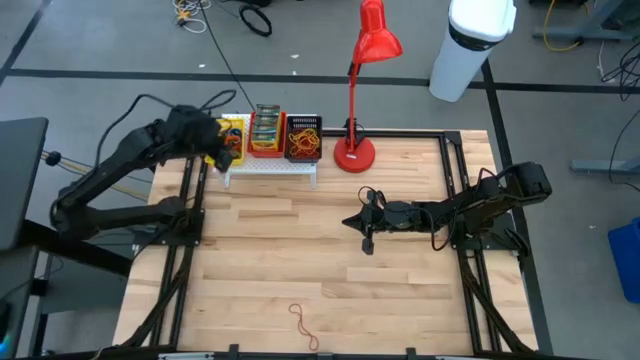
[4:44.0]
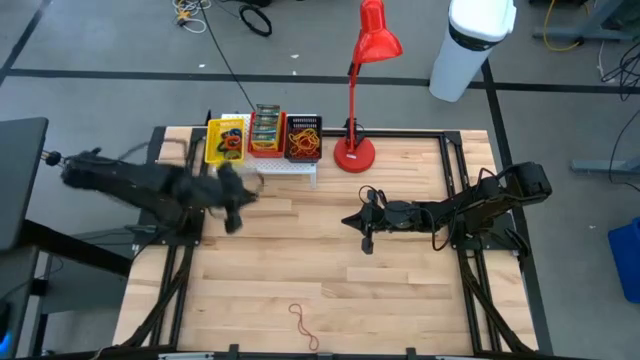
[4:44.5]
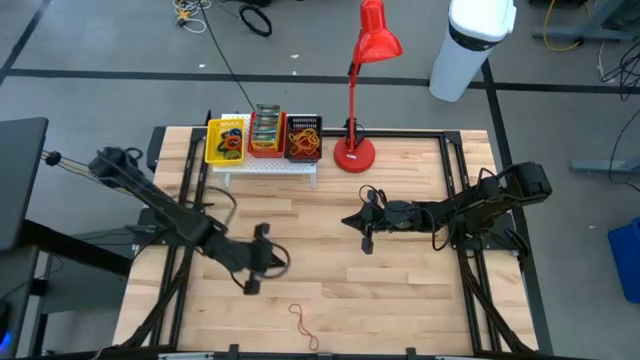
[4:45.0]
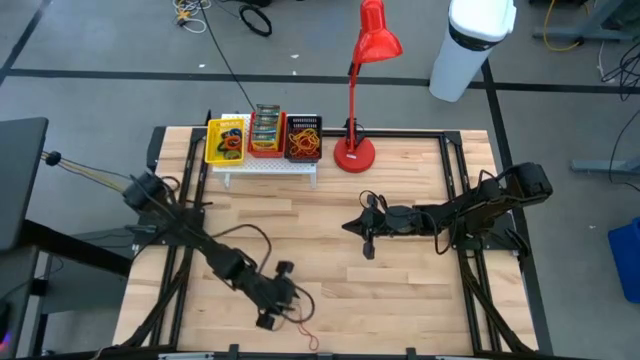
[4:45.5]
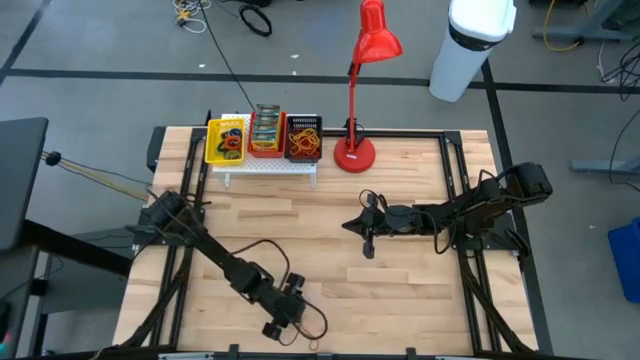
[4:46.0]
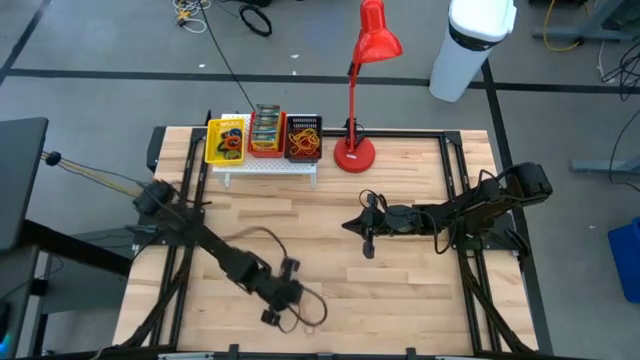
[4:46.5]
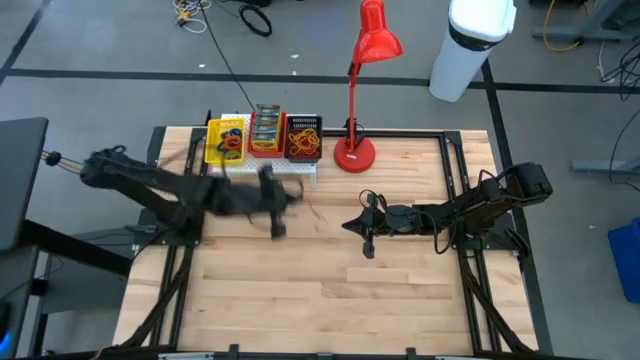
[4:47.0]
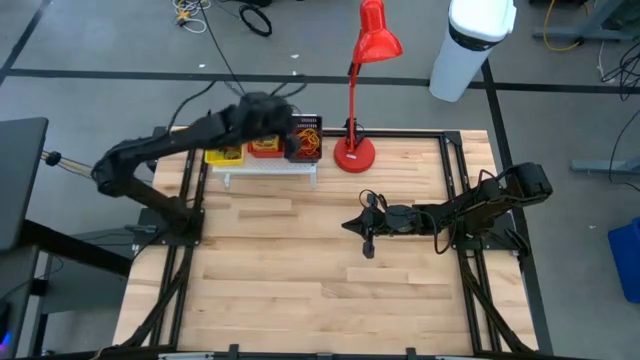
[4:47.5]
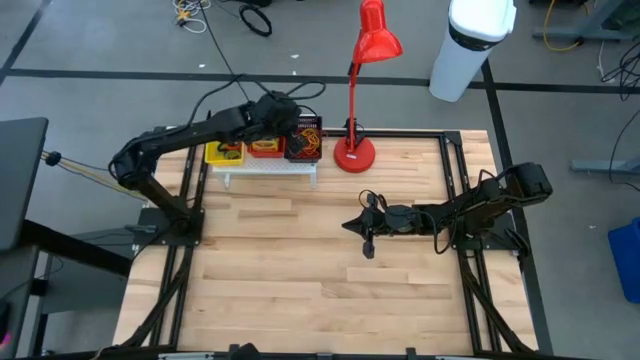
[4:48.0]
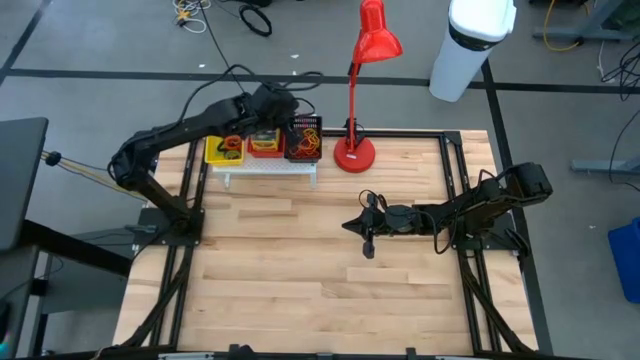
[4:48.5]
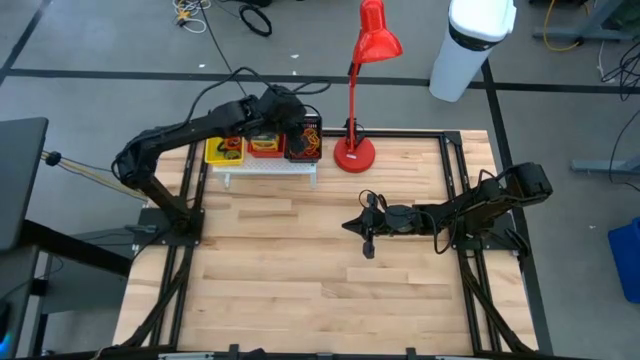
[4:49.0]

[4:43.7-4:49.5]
Task: Pick & Place Office Desk Supplies
Put the red rubber band into the black bin on the shelf

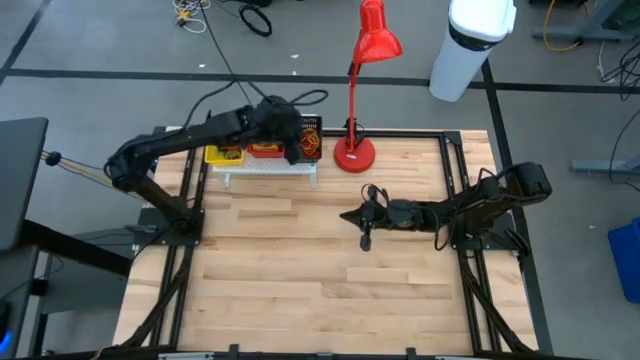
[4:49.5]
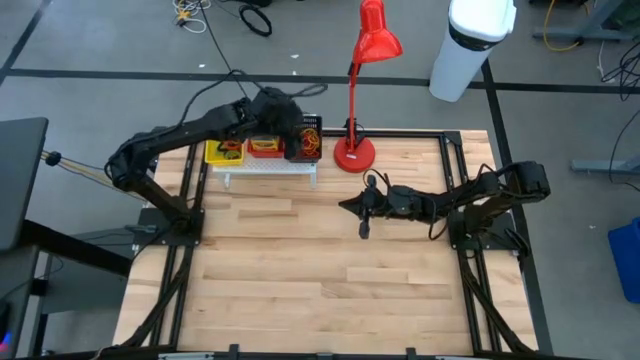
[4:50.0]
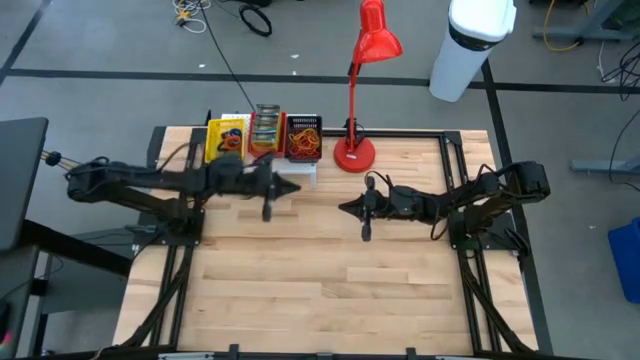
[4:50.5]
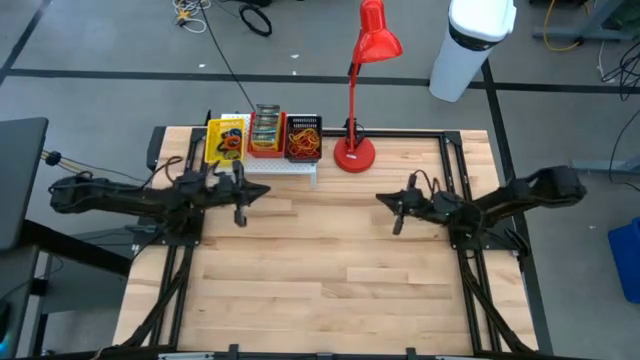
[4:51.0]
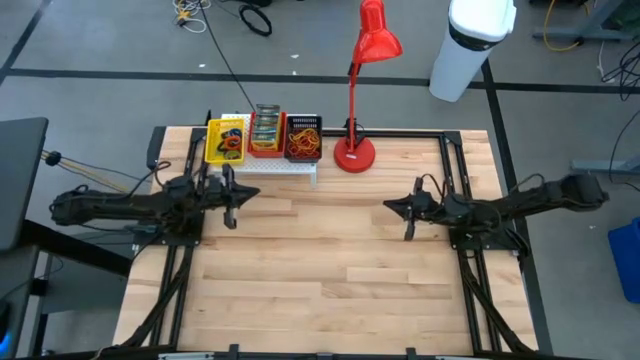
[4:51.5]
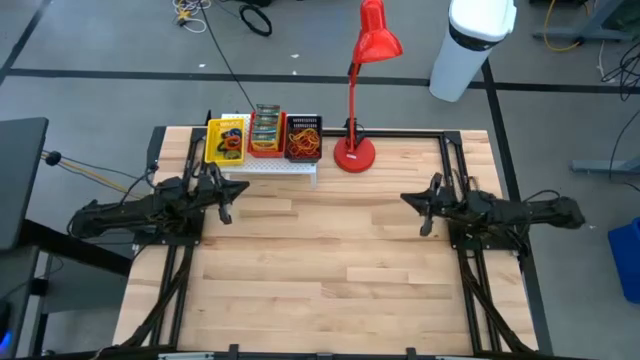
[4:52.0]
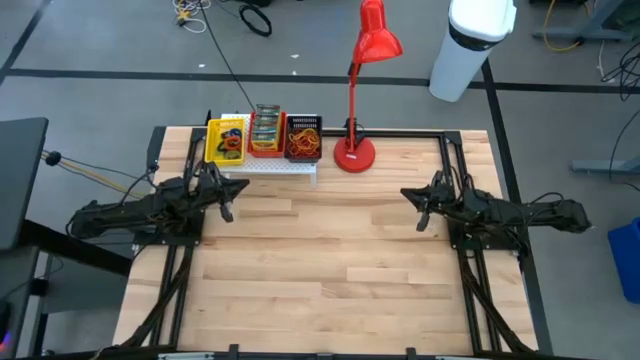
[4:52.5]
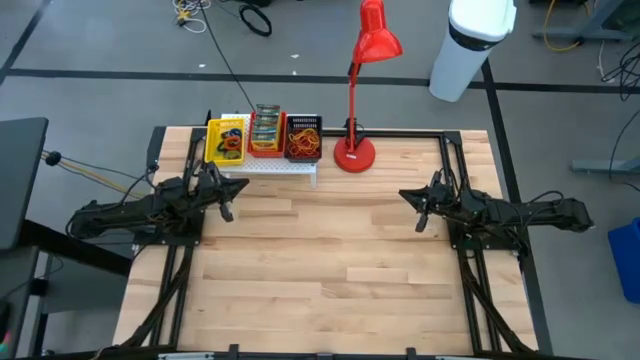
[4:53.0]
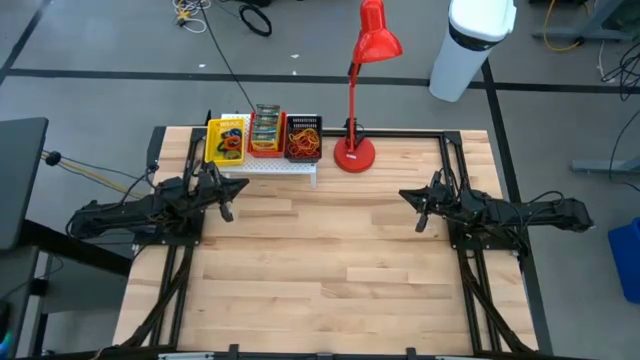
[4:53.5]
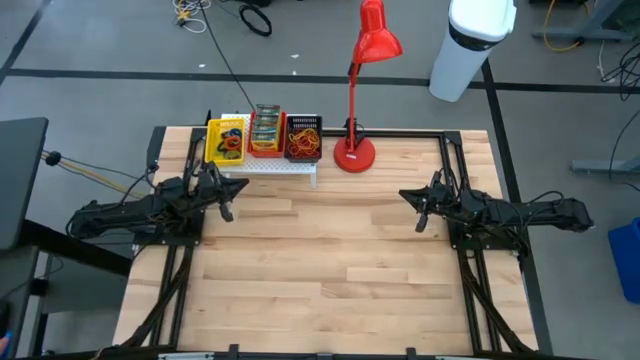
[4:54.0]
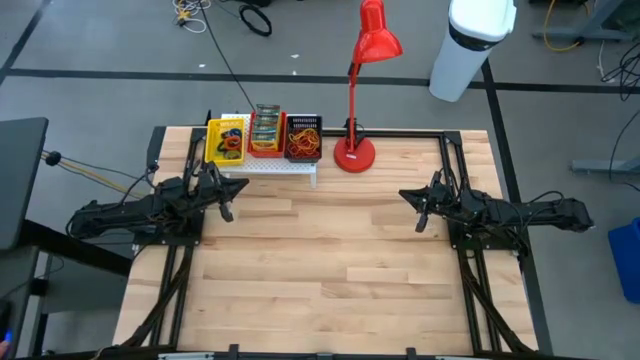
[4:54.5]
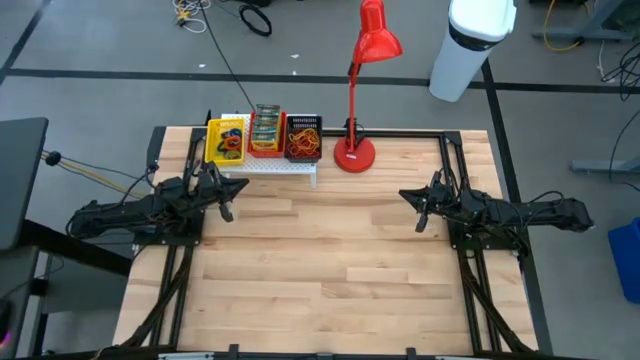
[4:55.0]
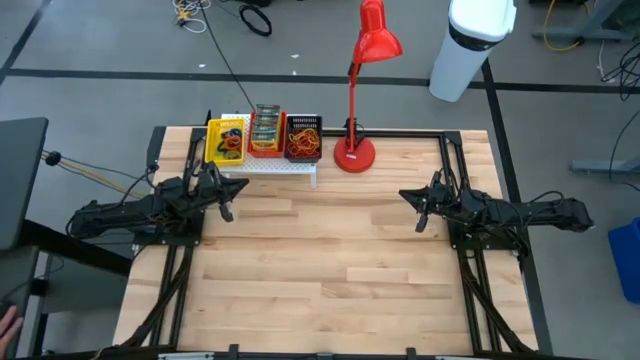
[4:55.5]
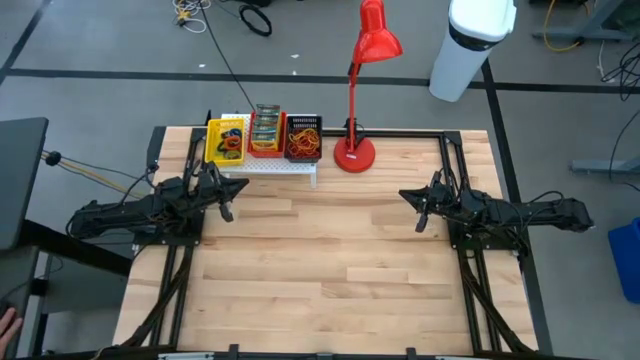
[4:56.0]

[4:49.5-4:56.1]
Return to Home Position

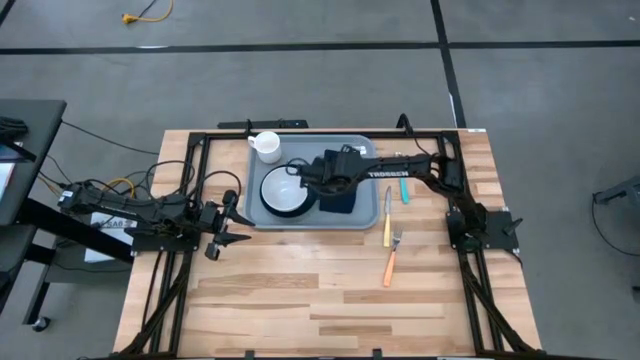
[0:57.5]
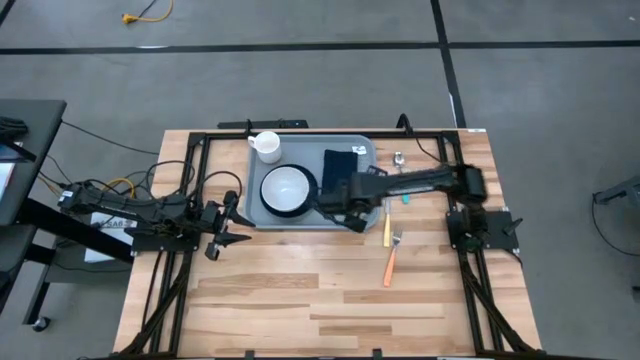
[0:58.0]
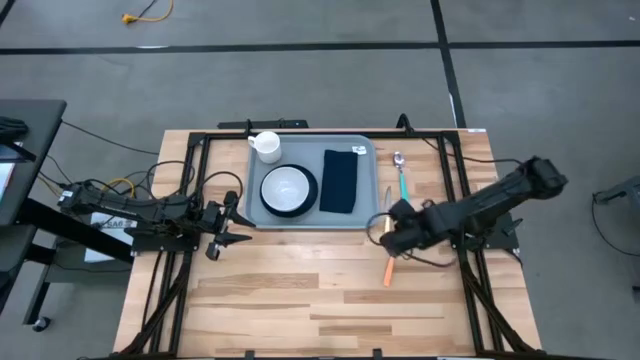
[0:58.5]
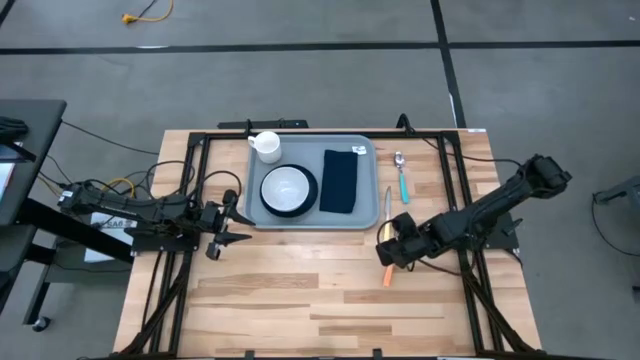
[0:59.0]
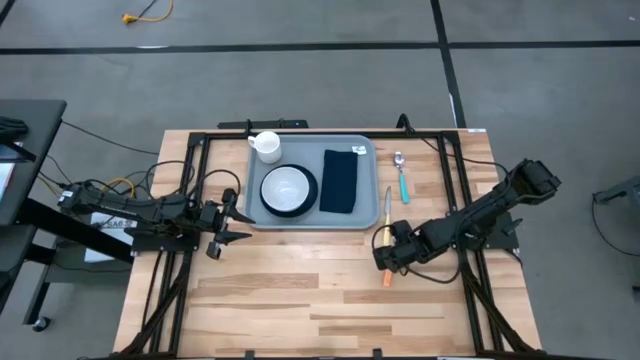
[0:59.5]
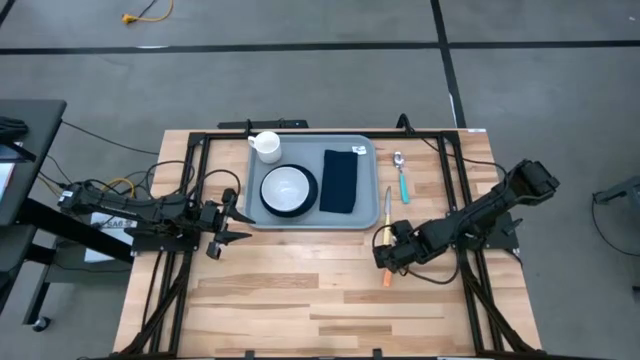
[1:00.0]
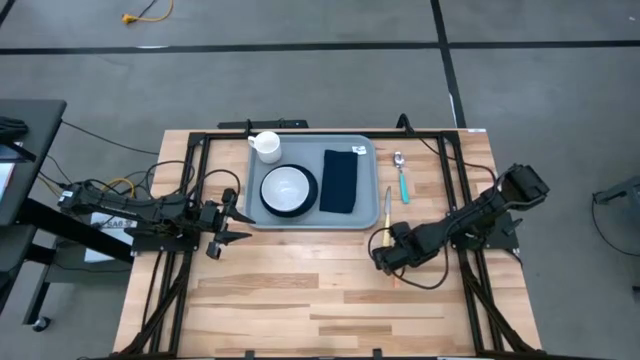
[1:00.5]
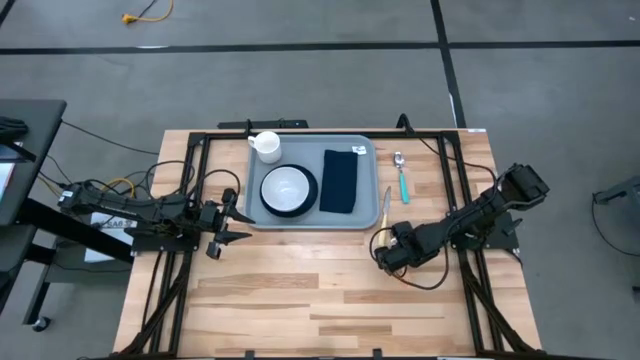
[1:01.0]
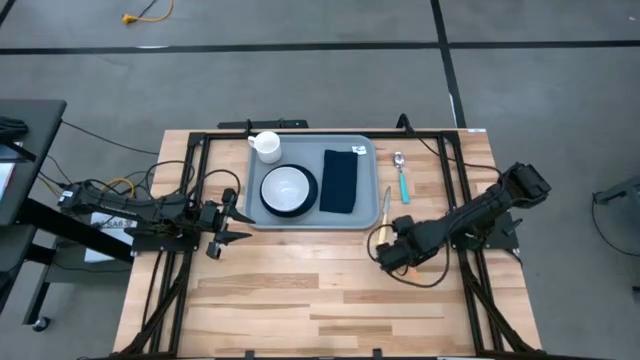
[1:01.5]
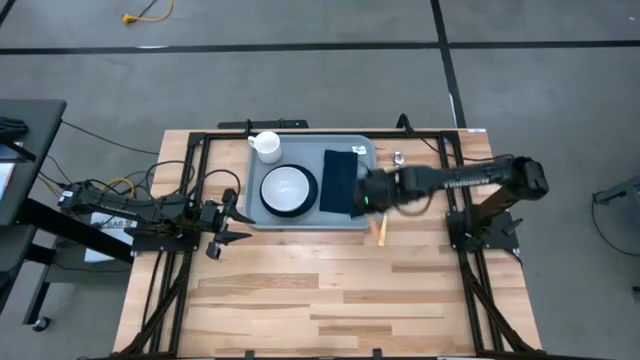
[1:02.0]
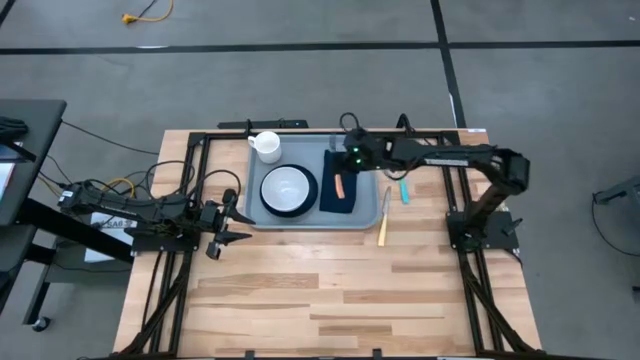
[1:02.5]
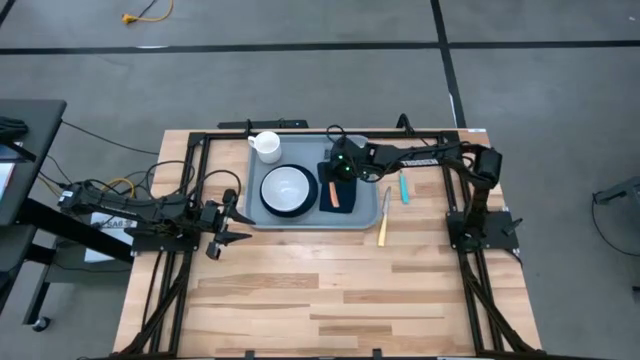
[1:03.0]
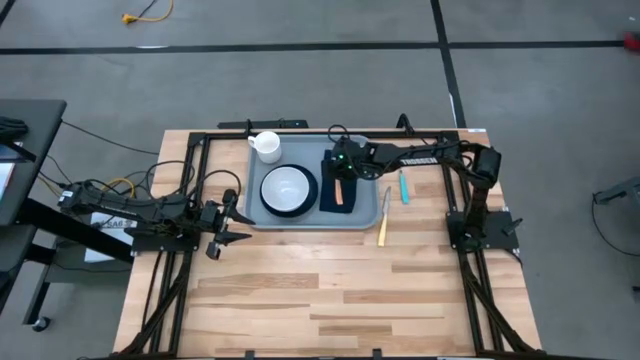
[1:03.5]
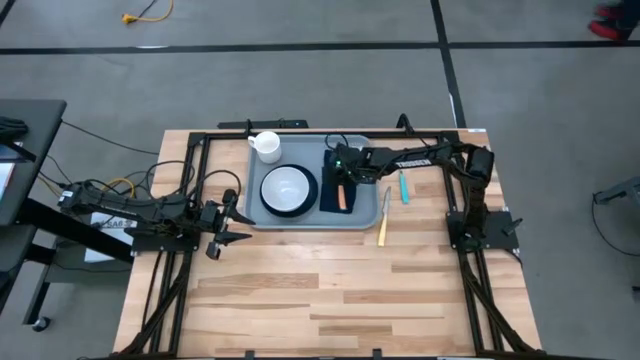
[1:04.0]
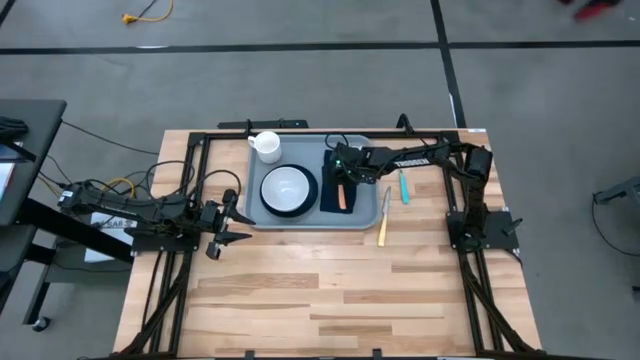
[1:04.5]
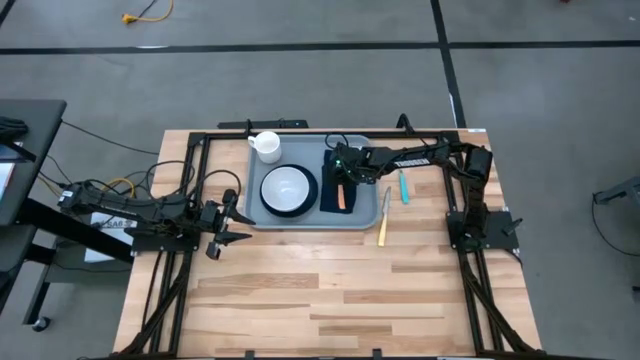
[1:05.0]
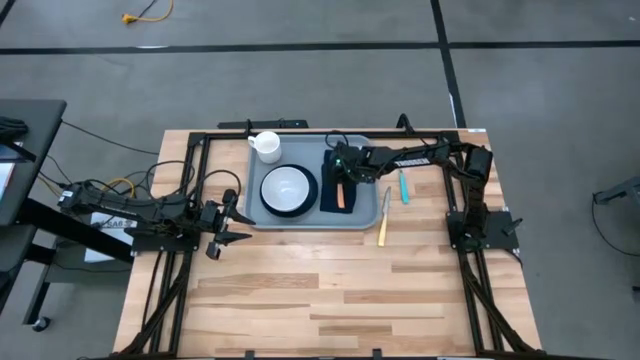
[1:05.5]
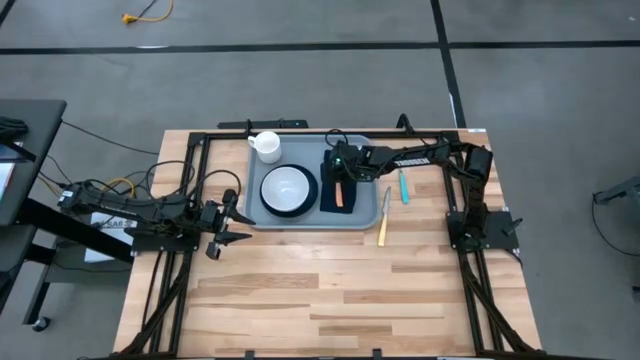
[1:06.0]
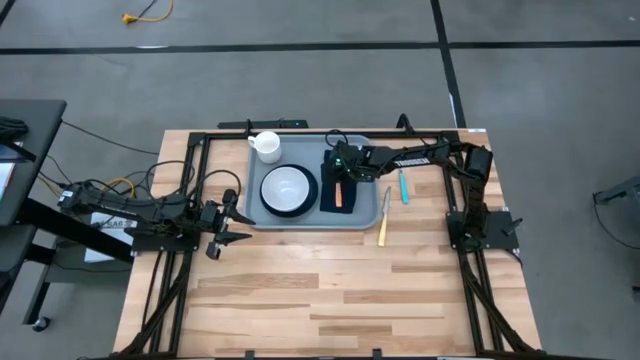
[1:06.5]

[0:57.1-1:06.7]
Task: Set up tray
Put the orange fork on the dark blue napkin
